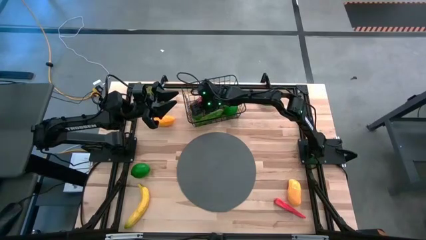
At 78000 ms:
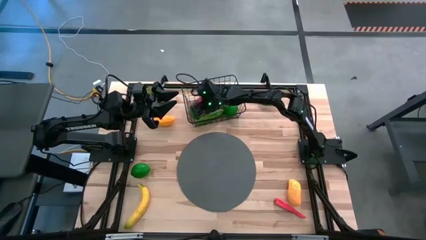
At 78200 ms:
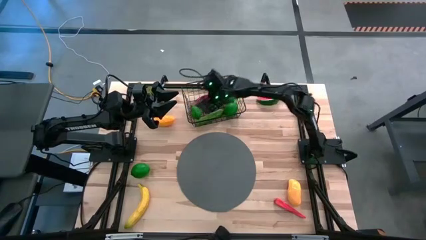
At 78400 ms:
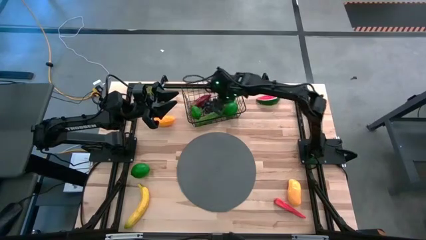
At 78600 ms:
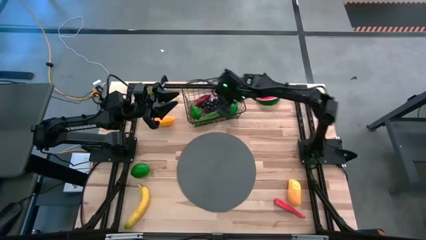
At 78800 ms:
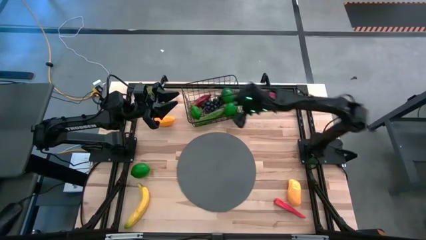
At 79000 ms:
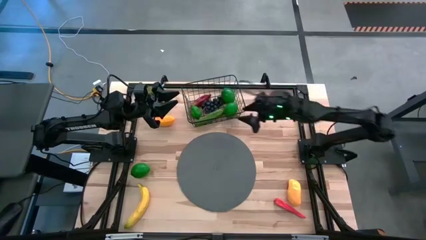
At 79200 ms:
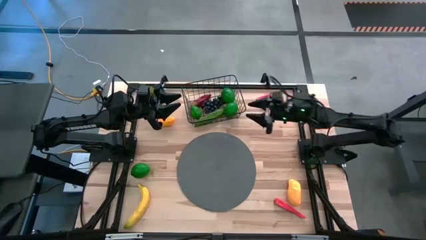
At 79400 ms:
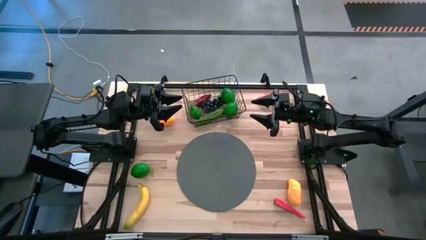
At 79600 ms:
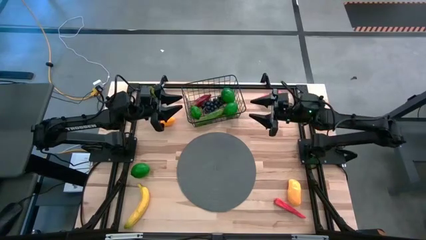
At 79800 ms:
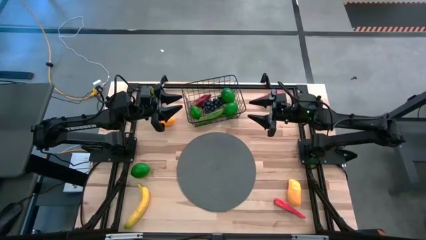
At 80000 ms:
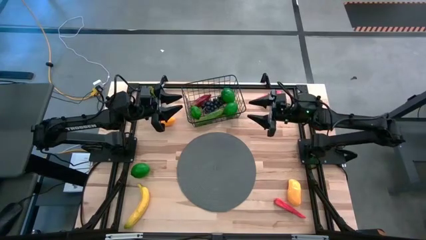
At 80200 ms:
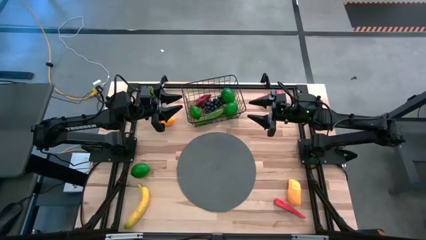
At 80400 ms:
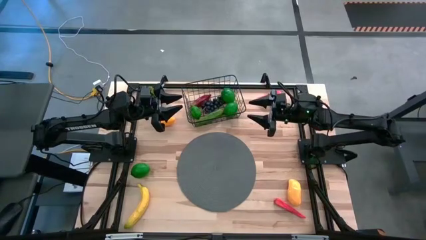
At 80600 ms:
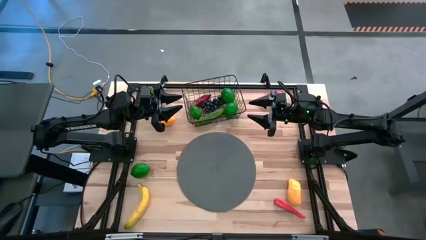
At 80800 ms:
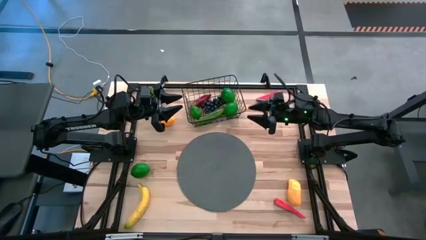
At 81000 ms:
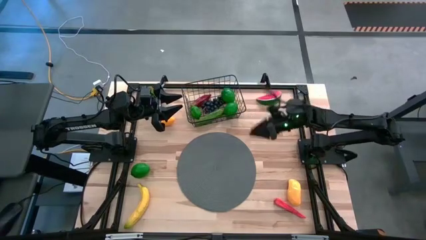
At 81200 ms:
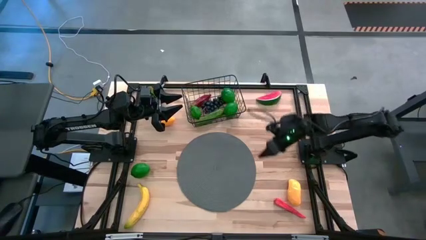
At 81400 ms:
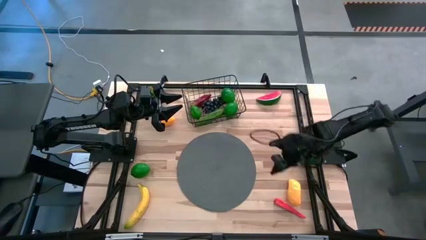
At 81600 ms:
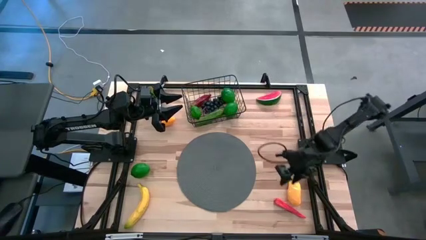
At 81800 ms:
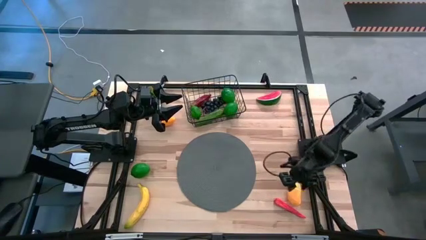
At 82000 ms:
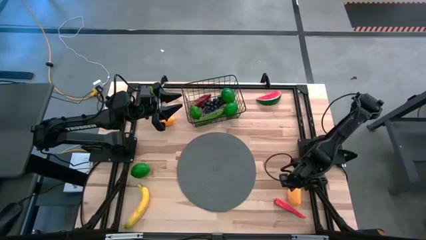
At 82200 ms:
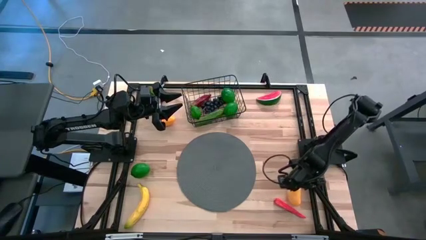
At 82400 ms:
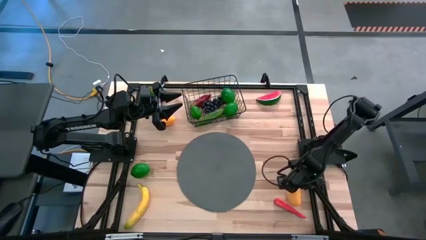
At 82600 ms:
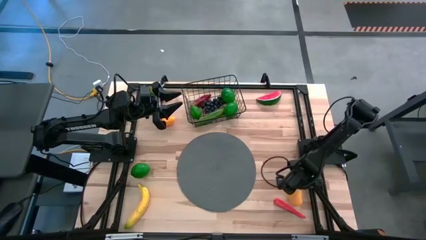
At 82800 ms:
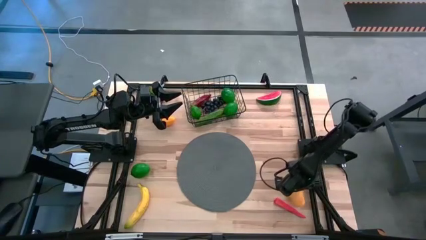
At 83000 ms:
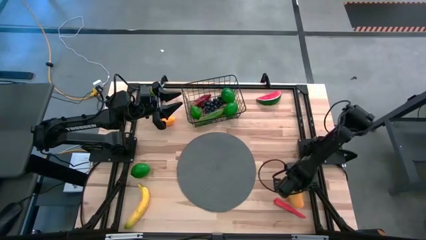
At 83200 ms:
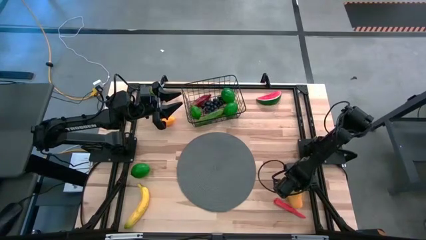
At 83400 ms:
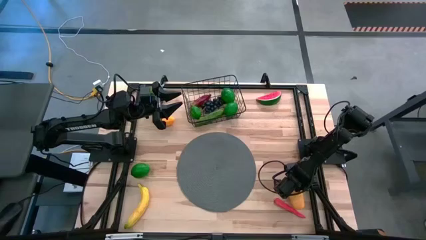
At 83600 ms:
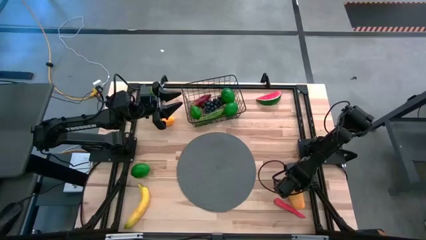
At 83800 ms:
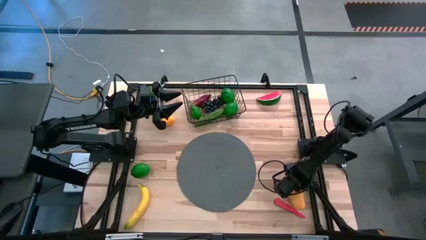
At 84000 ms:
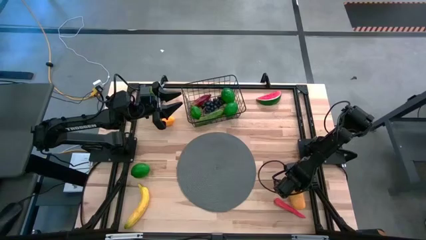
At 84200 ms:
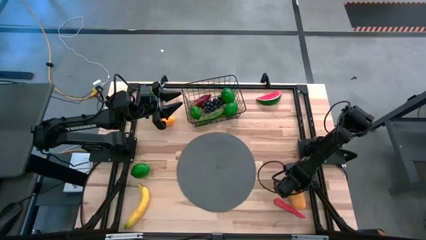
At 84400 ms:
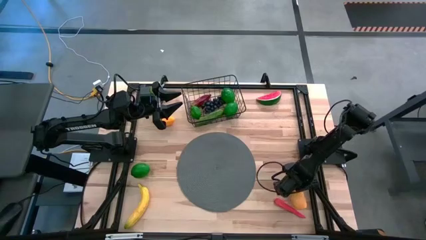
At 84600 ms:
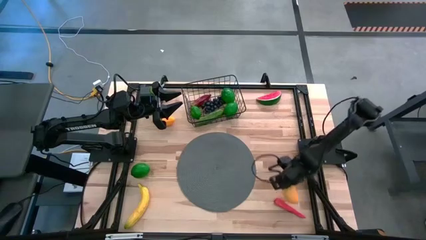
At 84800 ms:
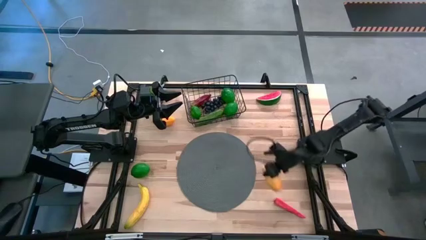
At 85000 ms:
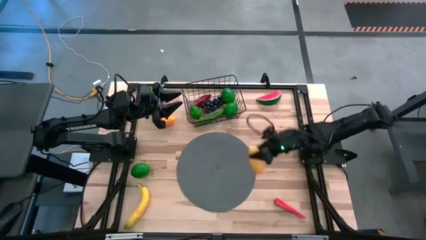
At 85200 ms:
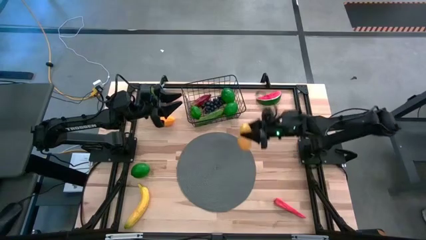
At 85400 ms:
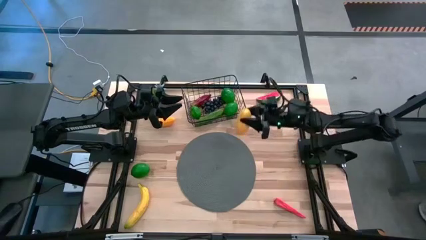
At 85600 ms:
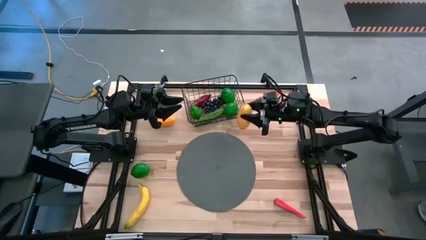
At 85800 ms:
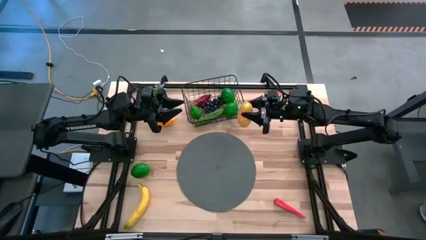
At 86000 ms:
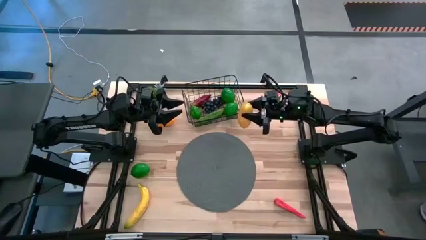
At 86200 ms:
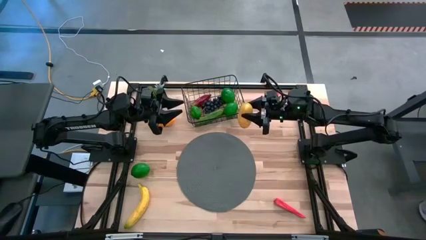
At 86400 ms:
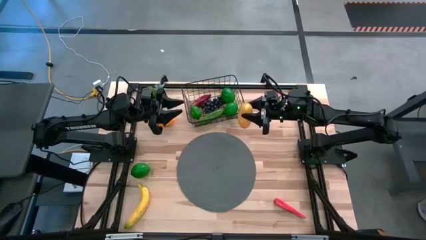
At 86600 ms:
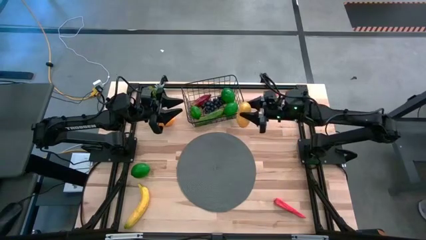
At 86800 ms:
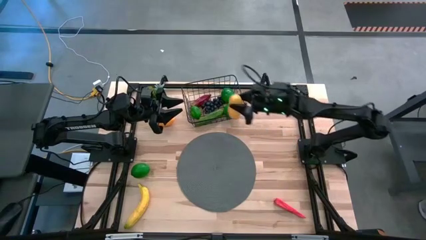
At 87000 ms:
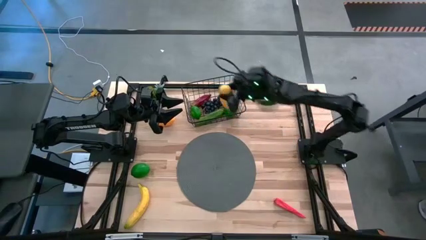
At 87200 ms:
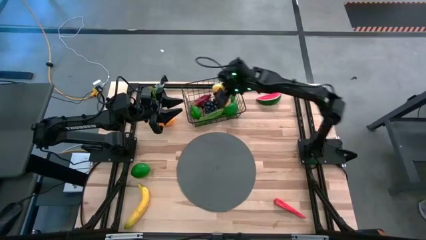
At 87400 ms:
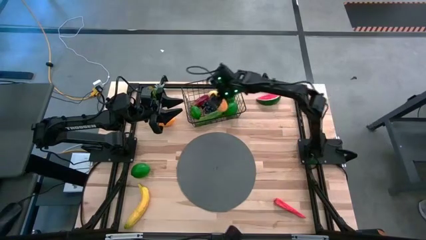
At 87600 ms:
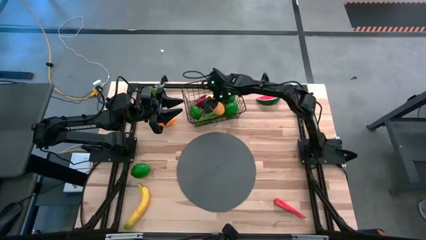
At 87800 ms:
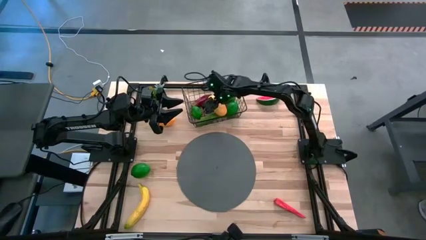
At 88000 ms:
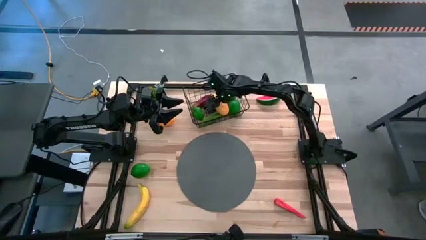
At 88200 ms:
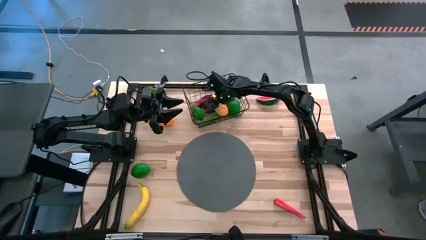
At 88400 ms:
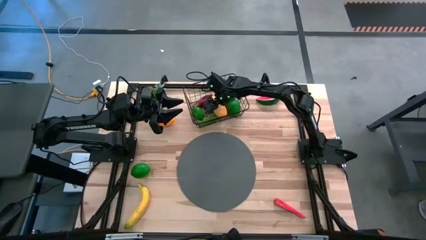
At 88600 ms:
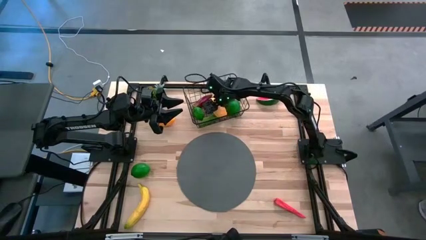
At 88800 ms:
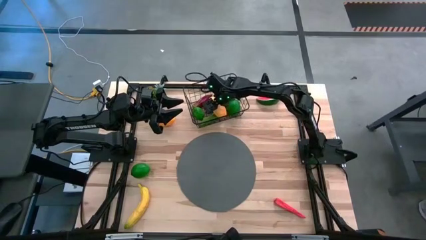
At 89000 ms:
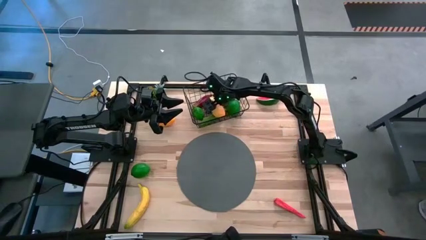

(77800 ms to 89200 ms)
Task: Build produce basket
Put the bottom yellow mango into the black wire basket

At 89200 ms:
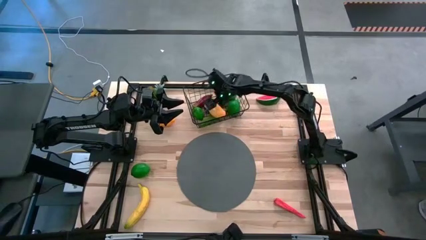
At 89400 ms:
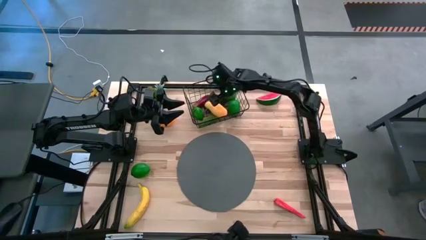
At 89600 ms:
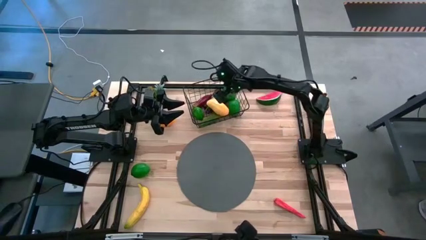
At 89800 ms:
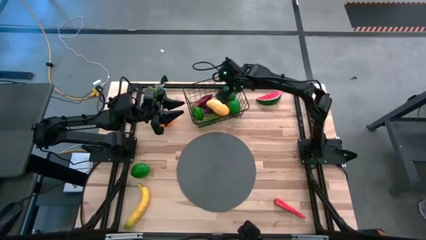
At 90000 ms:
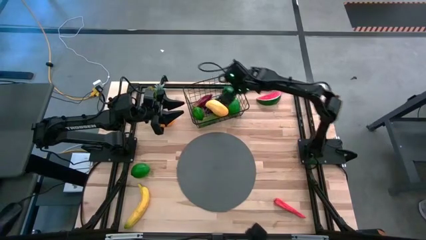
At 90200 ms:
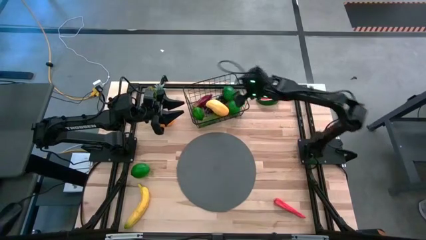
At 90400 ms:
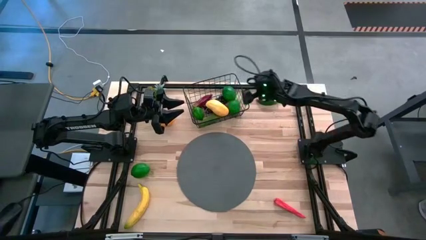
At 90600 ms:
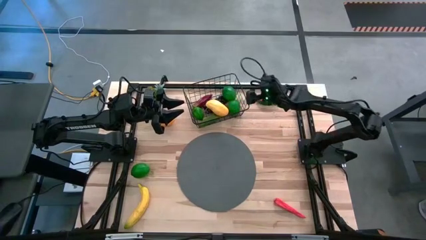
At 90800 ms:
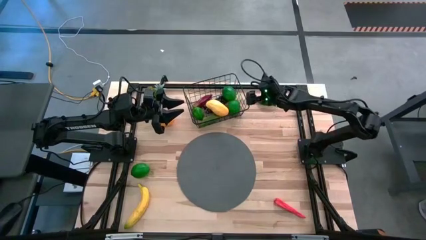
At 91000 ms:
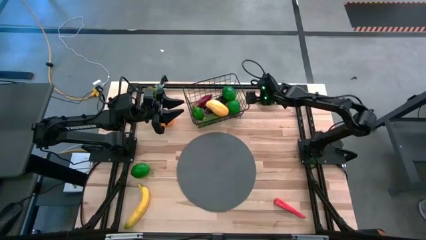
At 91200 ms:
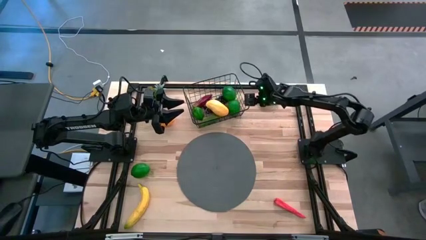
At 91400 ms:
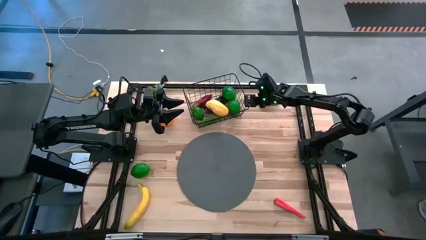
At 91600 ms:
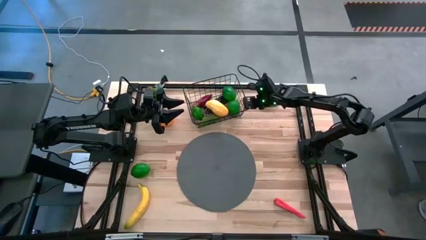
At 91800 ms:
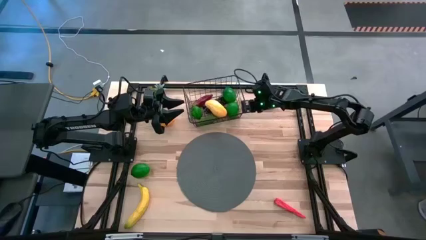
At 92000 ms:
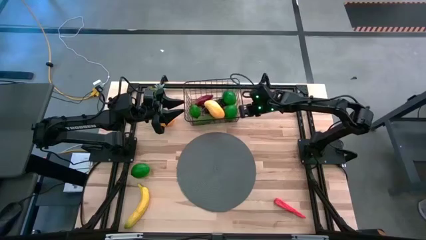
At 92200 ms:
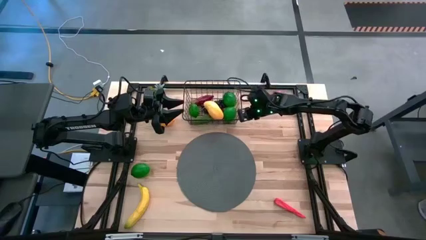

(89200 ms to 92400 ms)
Adjust the black wire basket
